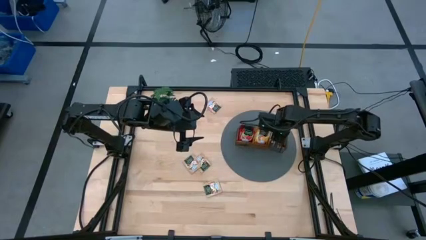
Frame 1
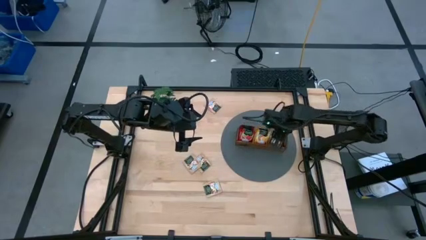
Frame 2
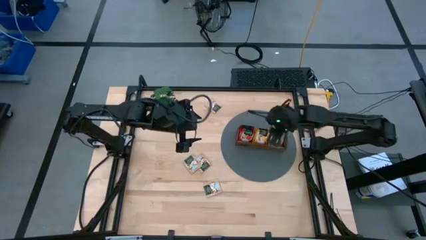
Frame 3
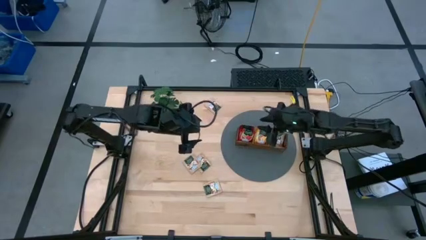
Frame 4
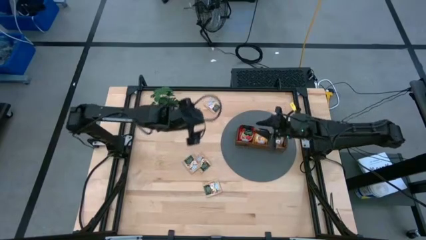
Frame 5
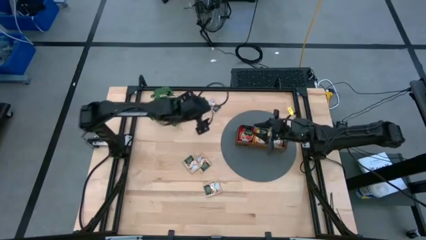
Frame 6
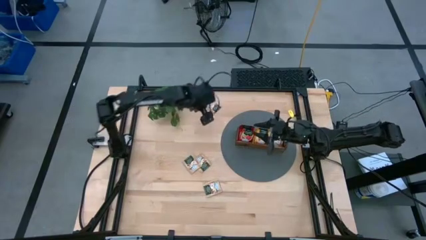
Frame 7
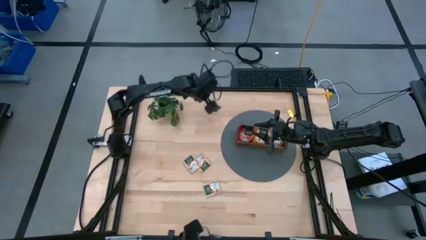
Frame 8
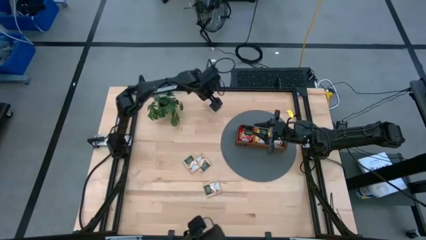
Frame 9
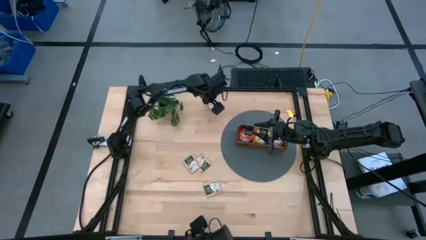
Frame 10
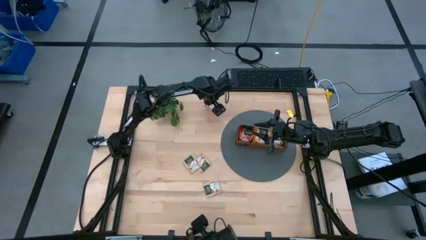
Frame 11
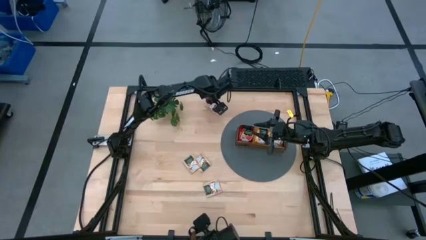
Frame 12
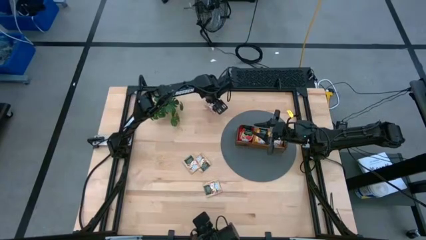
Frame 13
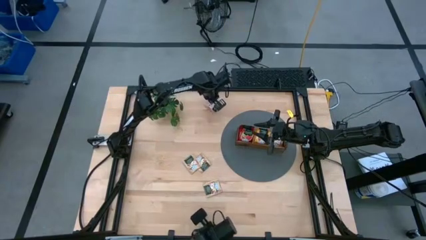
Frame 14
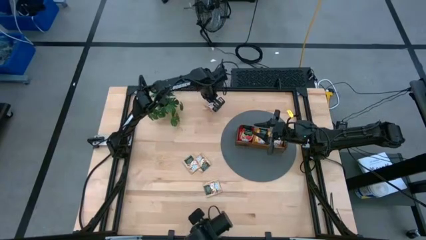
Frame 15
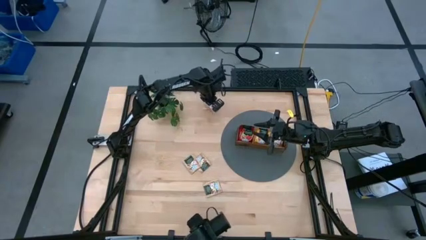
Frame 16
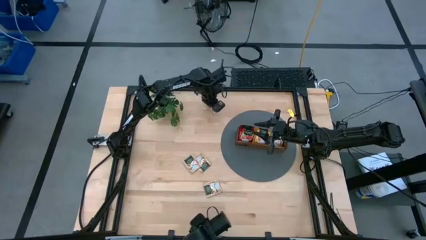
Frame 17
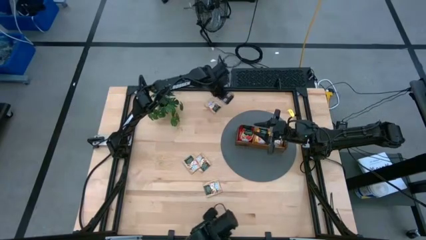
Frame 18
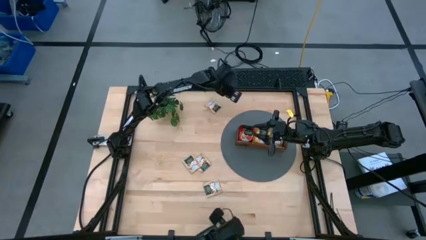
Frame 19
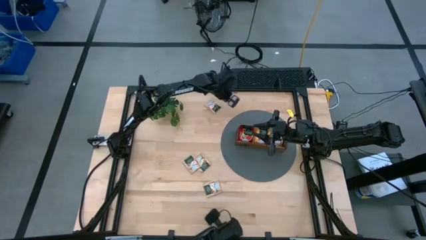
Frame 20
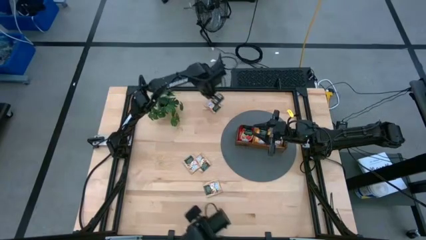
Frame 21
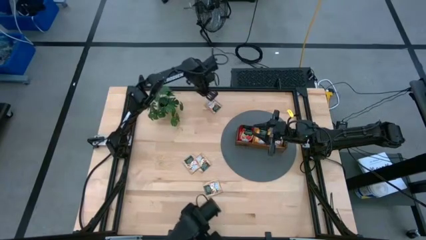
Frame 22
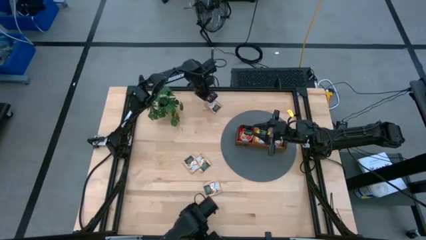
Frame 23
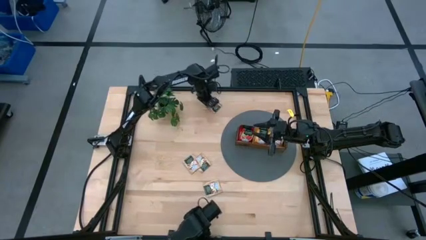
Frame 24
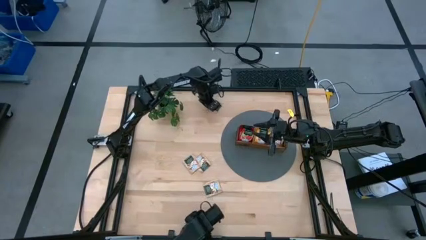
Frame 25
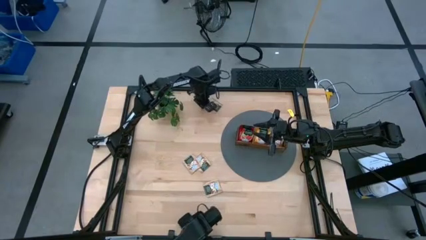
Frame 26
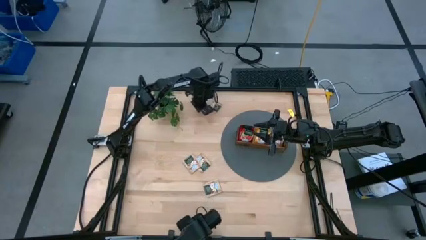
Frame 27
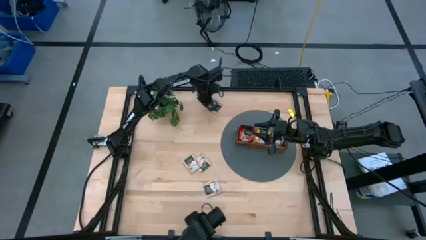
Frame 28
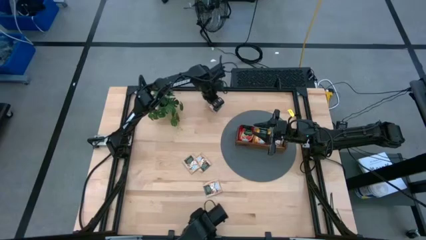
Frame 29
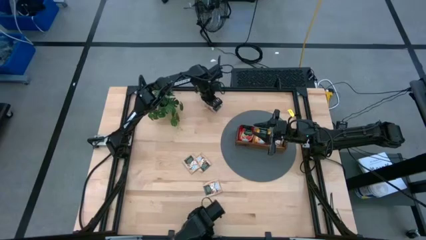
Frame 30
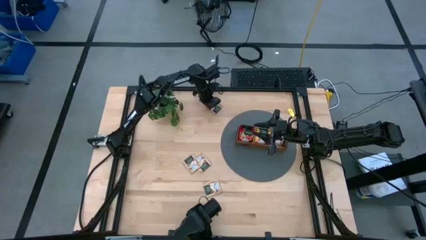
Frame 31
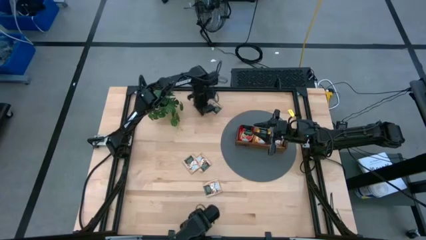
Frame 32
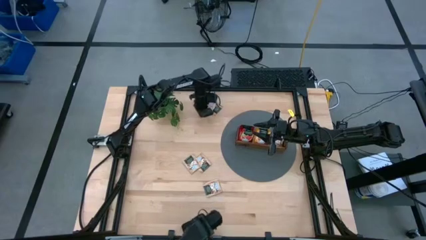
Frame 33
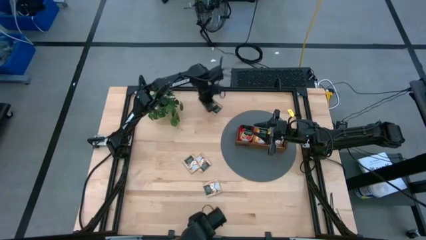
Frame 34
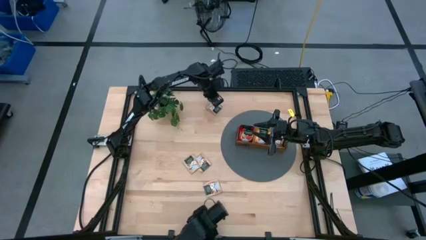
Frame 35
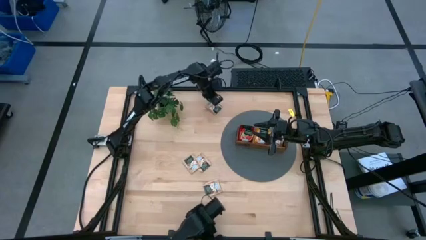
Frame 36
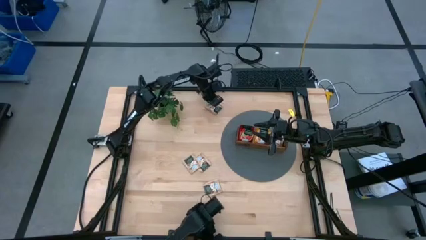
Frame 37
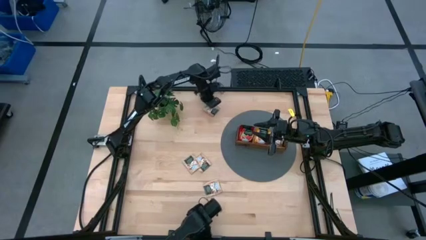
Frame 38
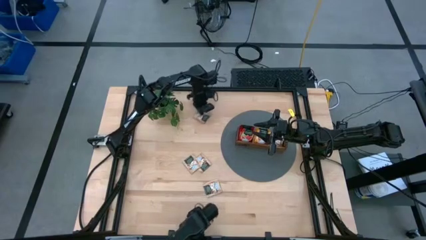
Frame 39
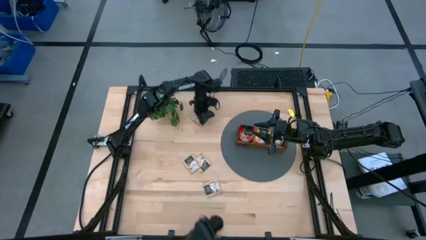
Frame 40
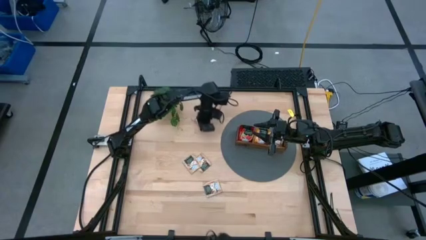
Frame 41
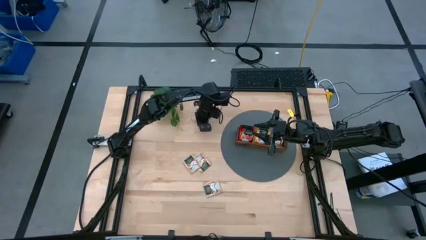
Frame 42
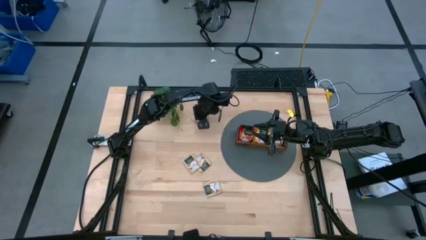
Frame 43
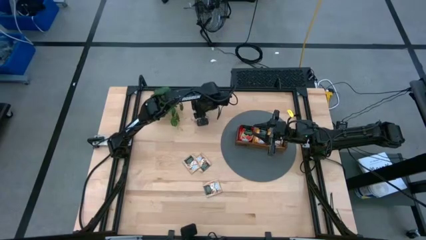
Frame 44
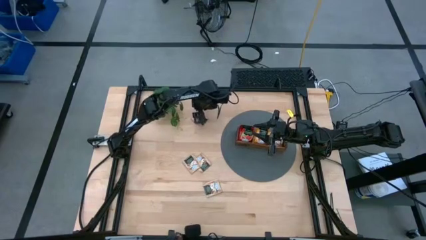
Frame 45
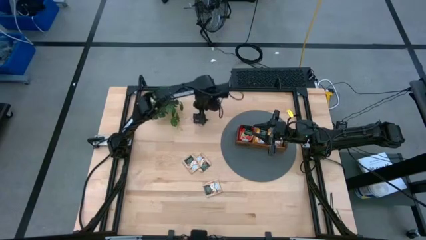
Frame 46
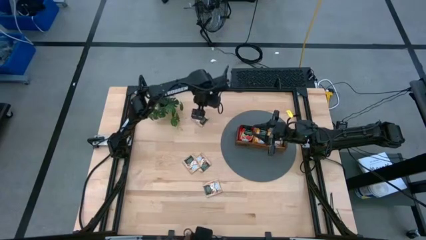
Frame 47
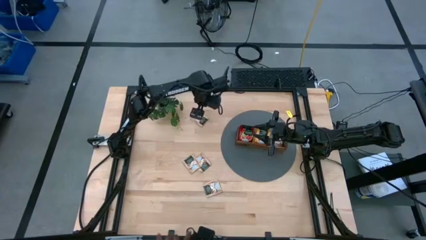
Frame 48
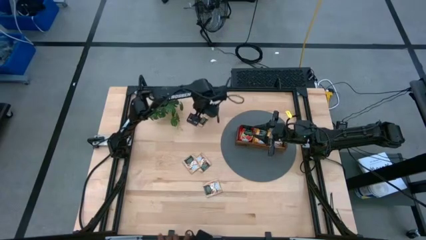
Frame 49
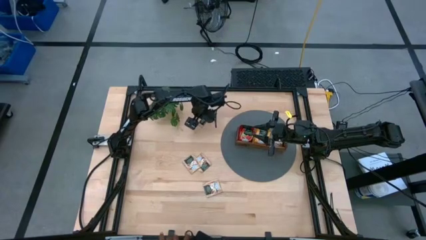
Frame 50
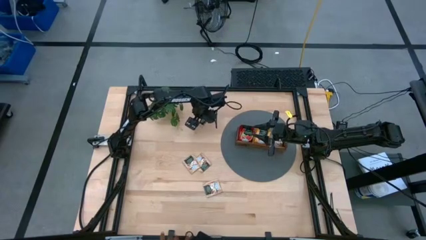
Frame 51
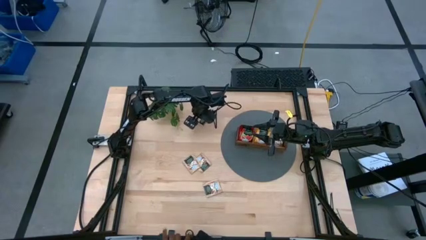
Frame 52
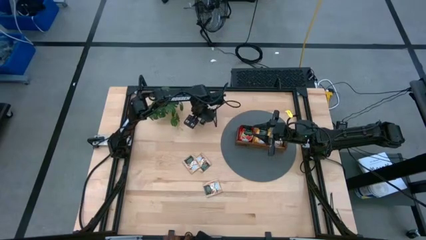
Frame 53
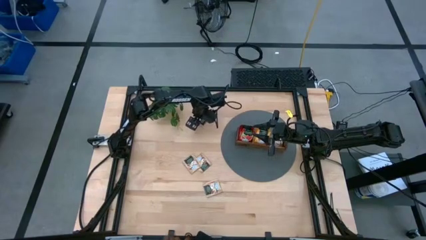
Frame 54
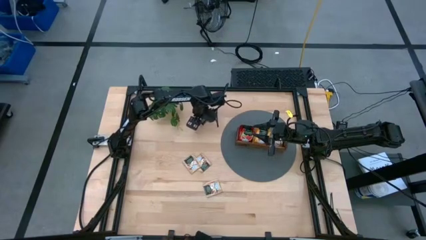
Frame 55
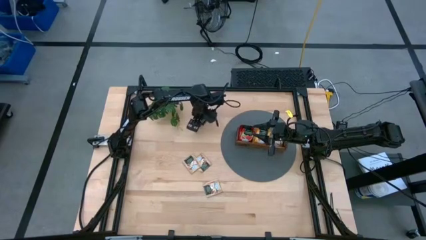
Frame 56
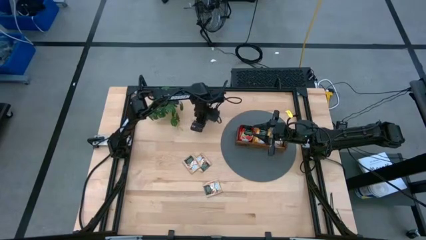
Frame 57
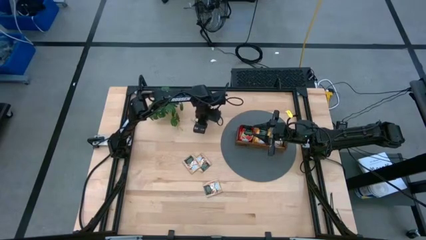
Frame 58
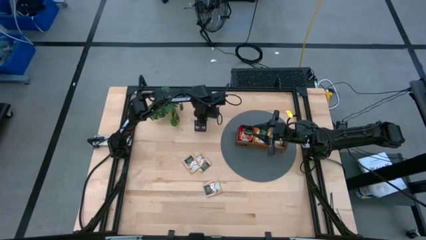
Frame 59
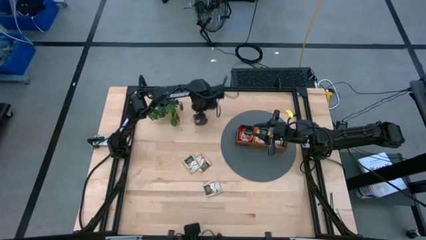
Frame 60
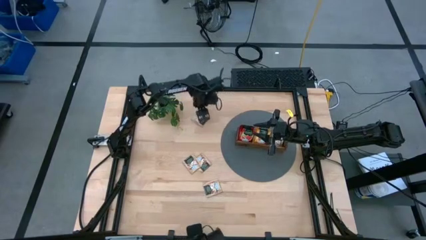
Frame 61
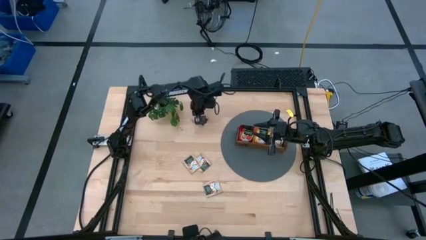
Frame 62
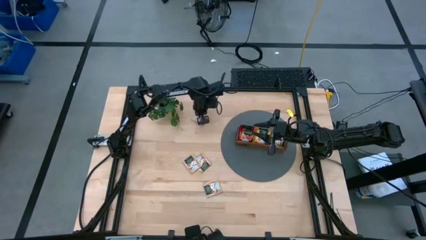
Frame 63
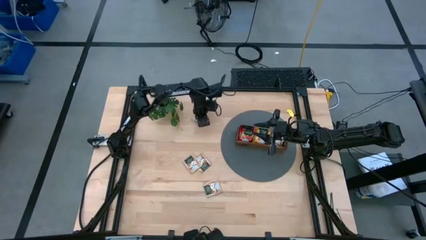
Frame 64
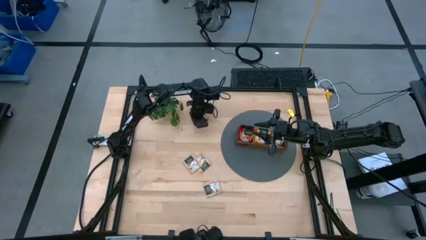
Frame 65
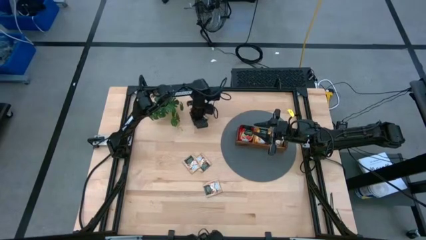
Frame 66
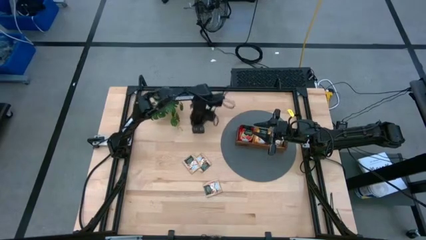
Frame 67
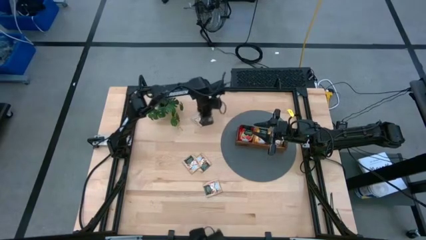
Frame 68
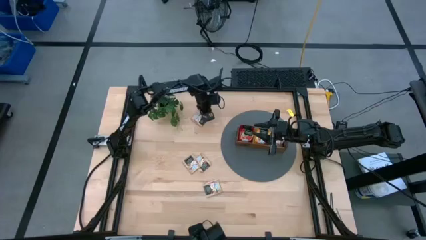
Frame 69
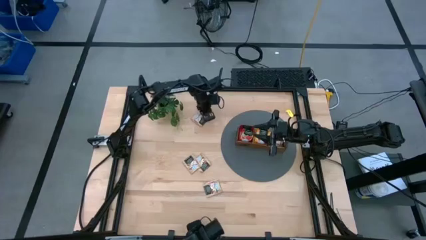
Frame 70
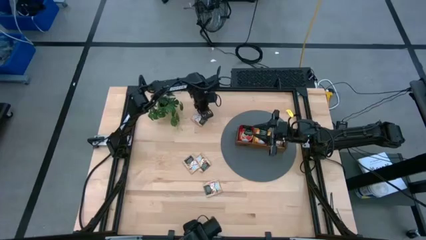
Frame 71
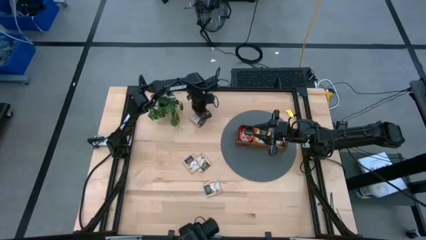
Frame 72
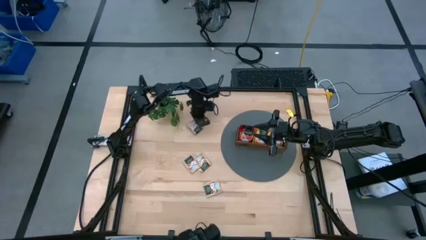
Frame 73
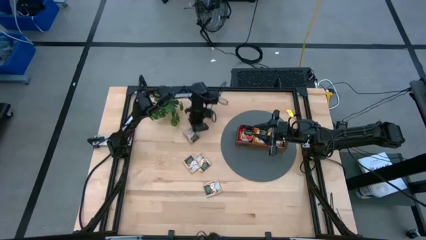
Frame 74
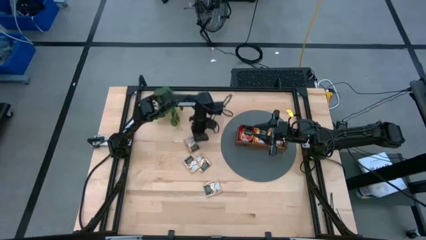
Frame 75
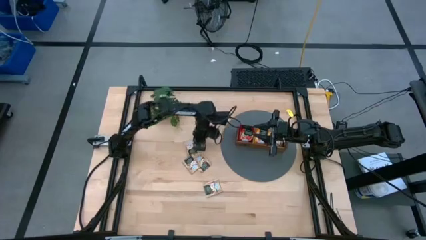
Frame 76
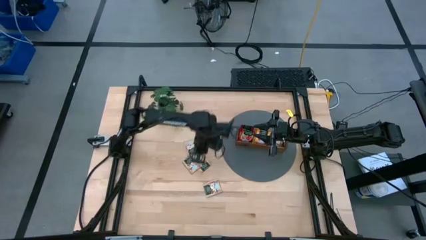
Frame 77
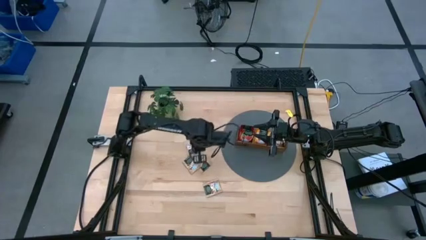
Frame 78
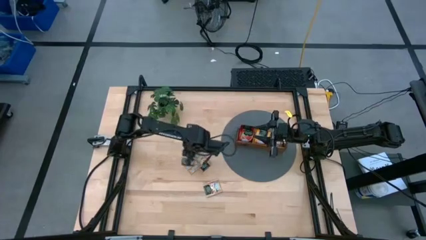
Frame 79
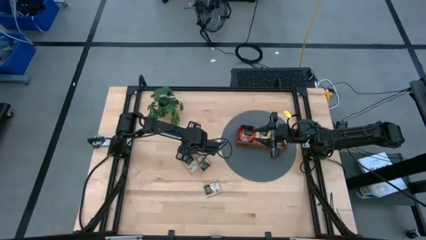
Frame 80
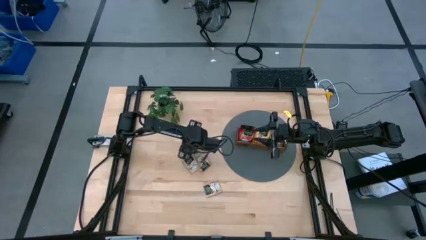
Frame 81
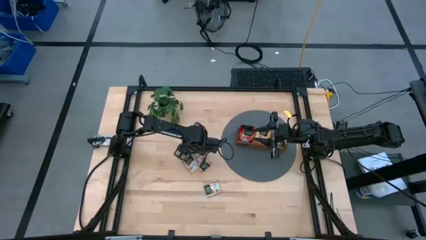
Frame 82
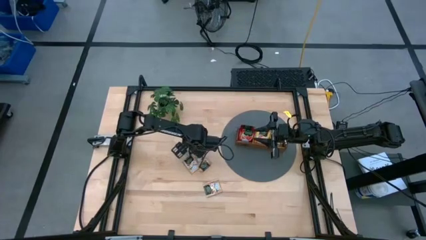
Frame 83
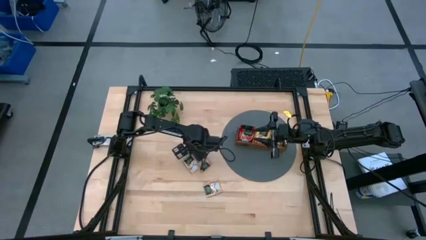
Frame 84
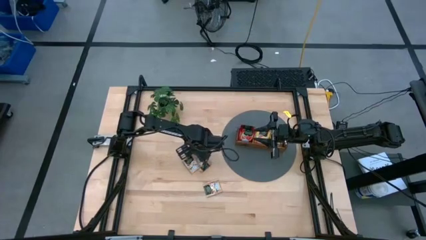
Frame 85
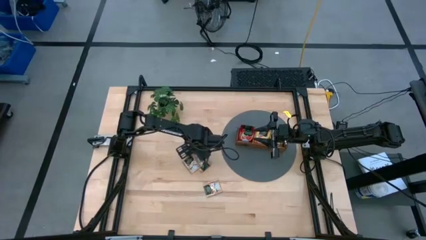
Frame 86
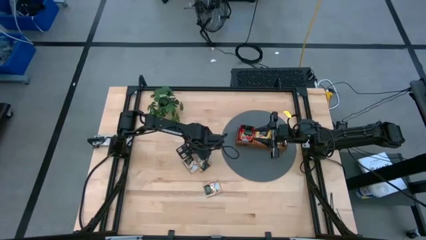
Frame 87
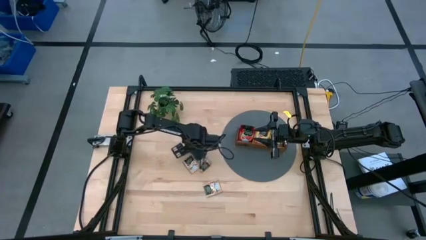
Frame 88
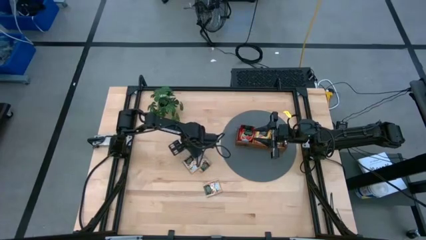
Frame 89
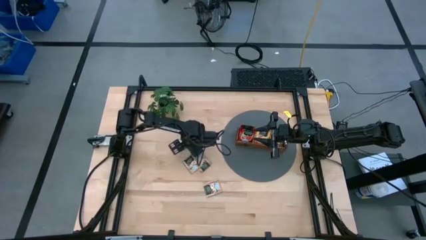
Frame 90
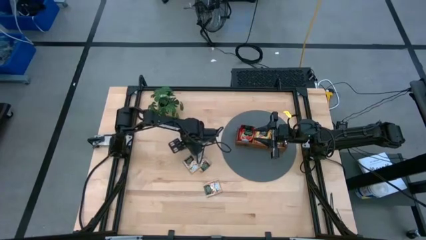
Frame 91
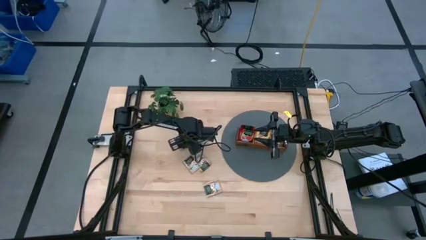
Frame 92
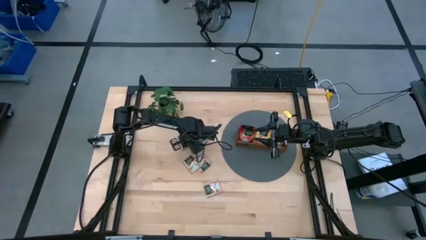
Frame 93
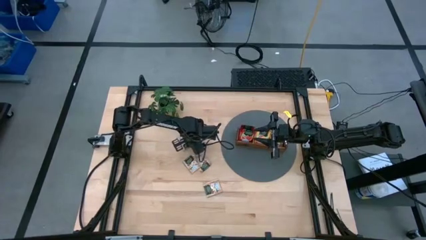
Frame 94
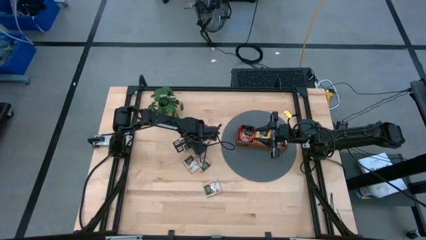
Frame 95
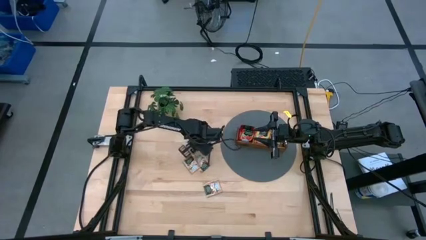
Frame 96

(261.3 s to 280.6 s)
Task: Pick & Place Tea
Put the brown tea bag into the right section of the wooden organizer
